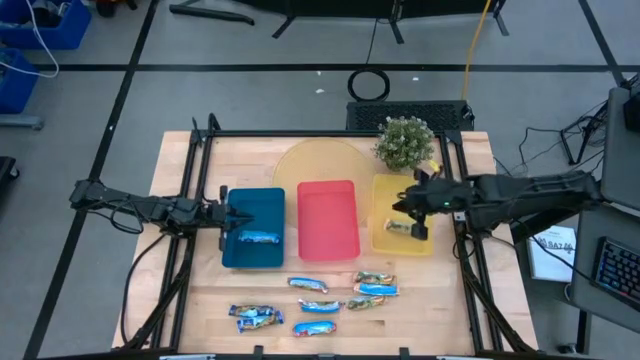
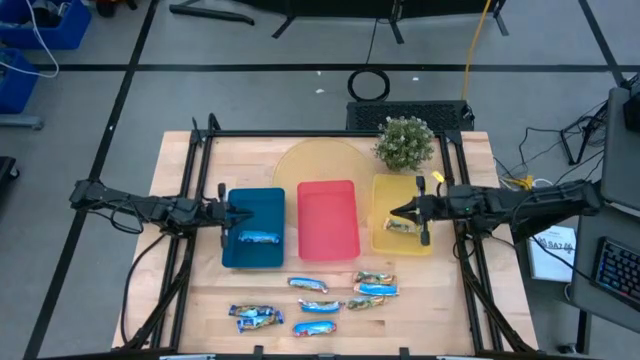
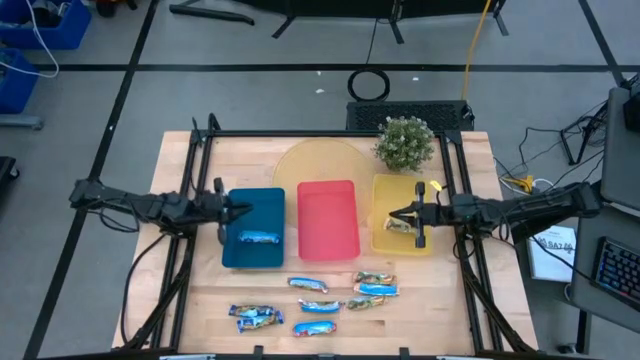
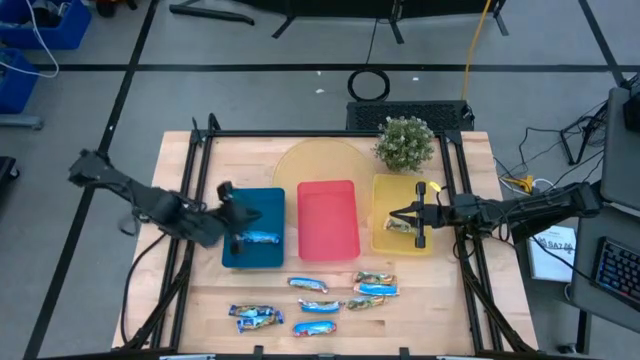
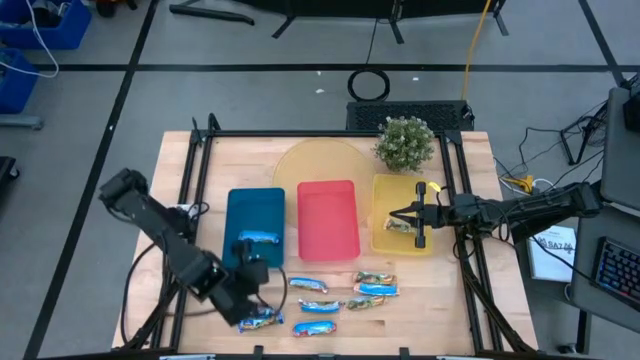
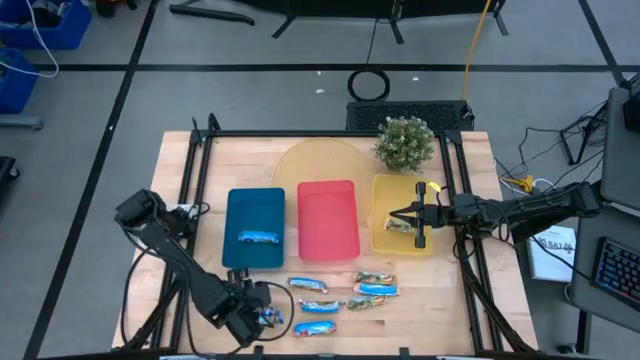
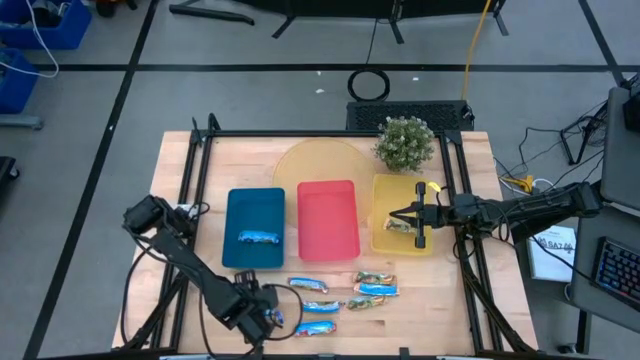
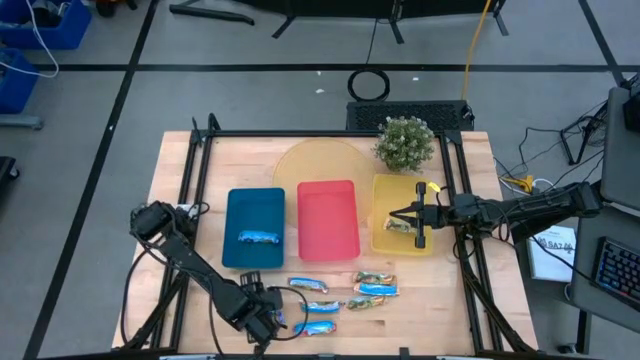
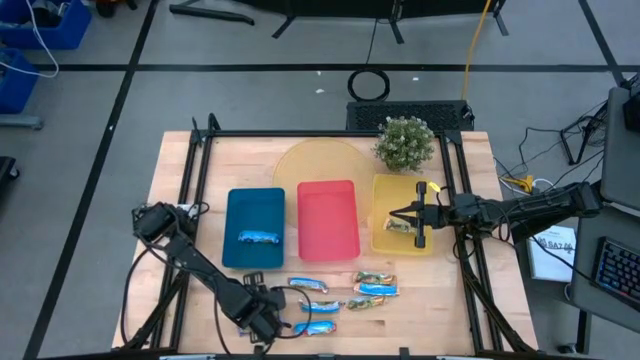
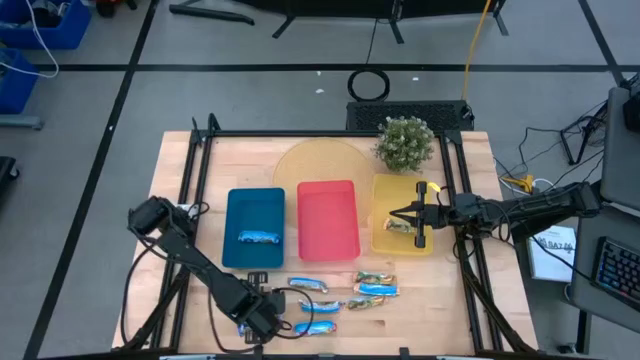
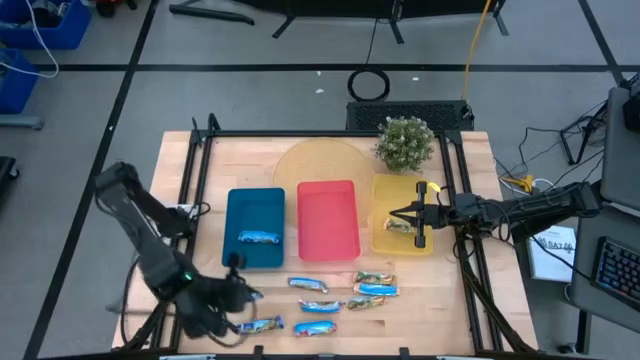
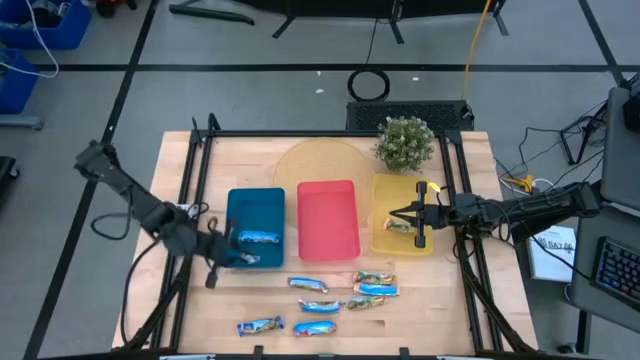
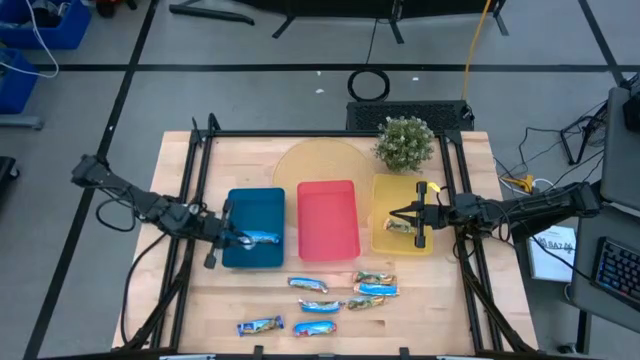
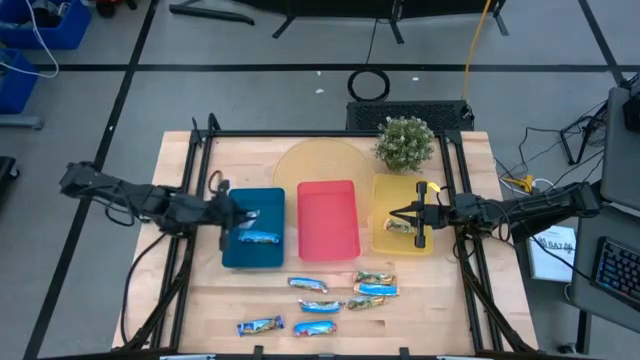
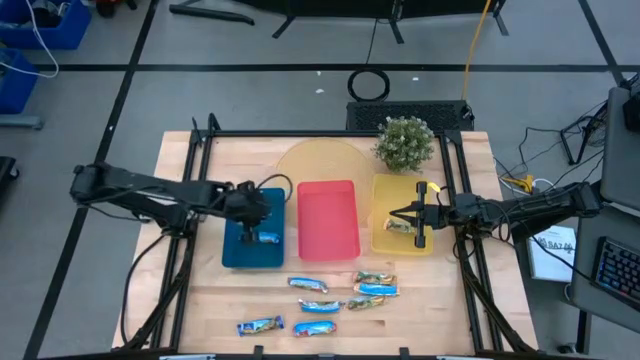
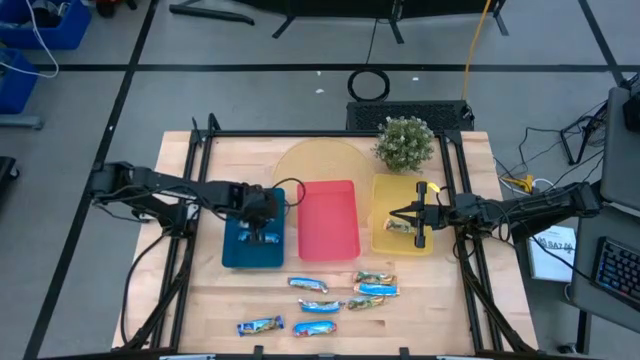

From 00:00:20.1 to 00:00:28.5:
Task: Pick and place Granola Bars by type
Put the blue granola bar into the blue bin

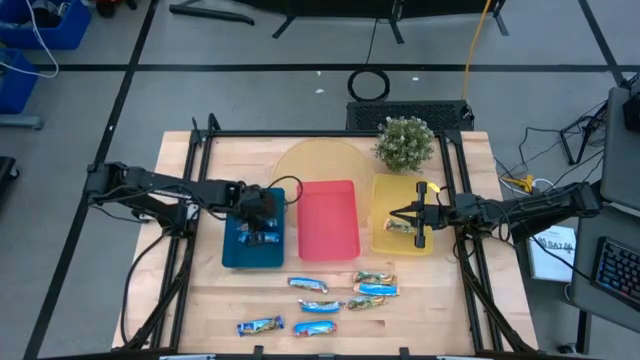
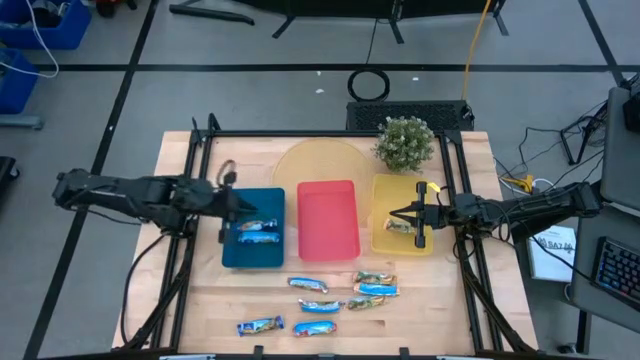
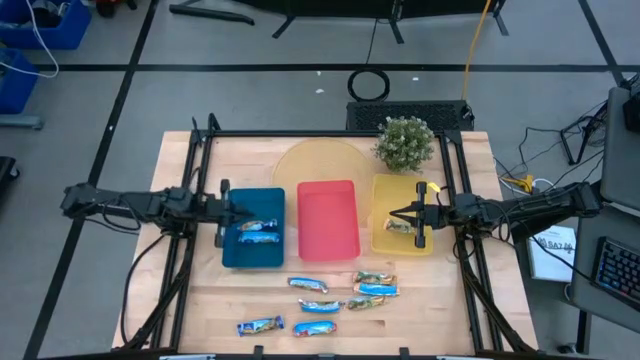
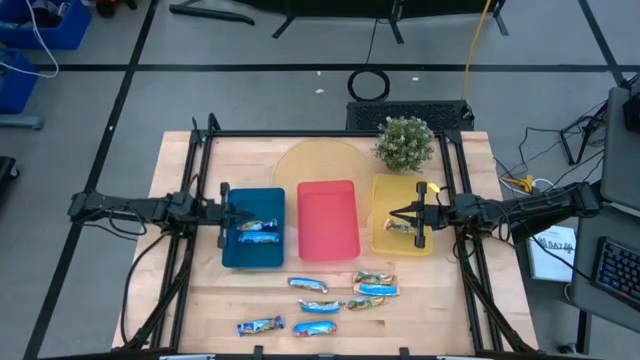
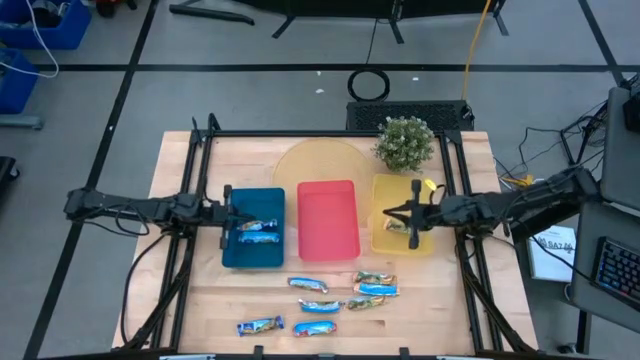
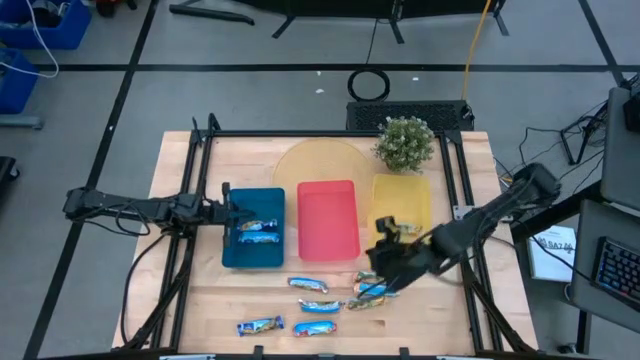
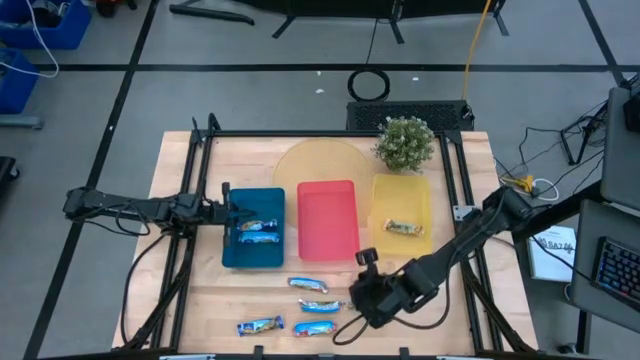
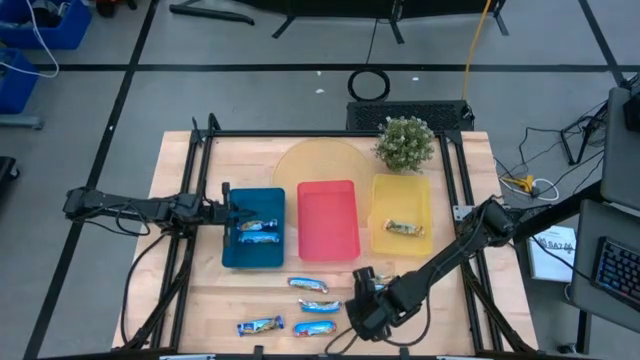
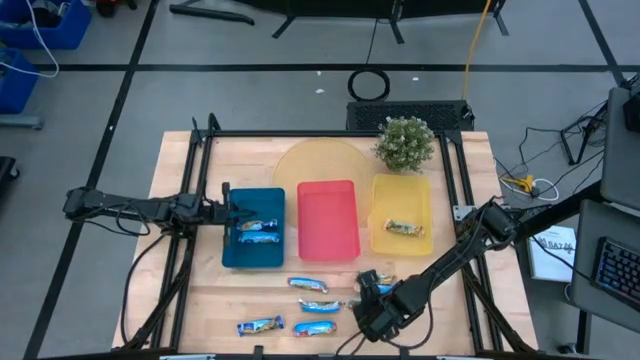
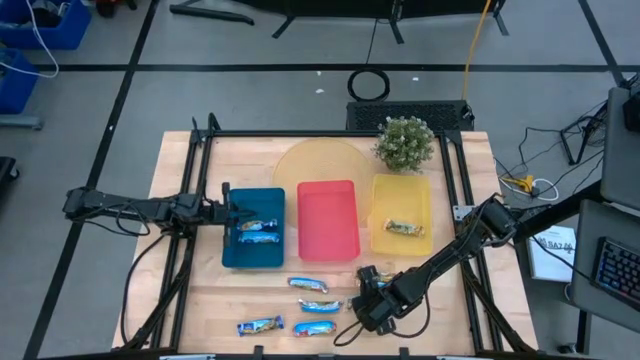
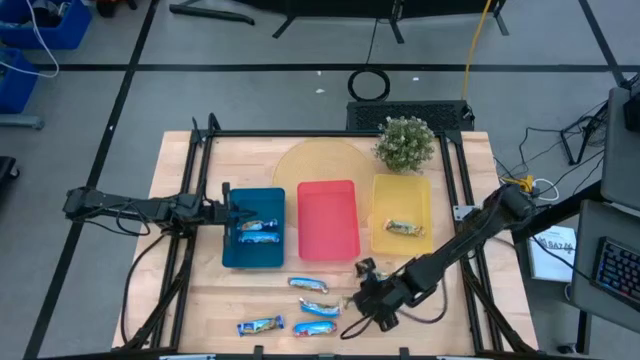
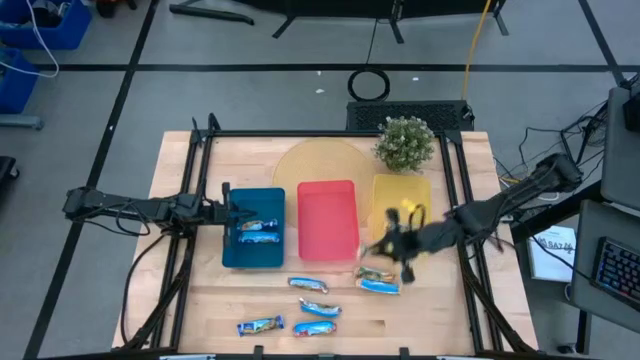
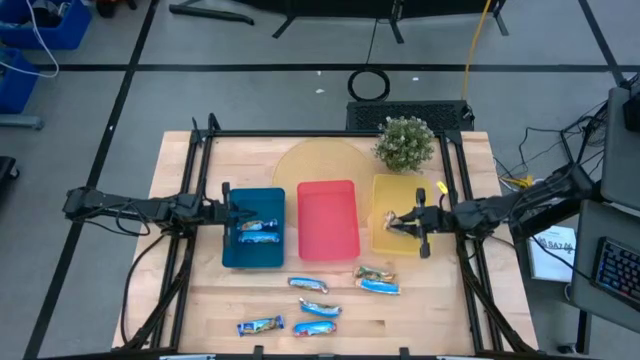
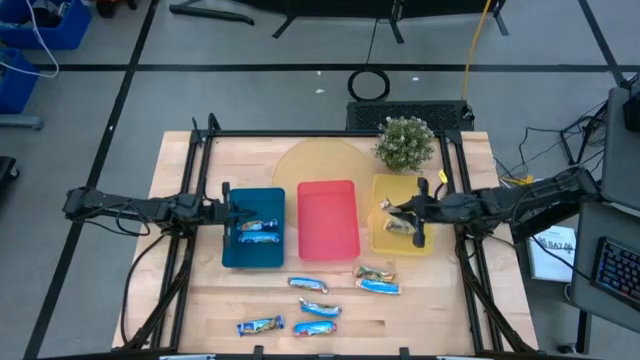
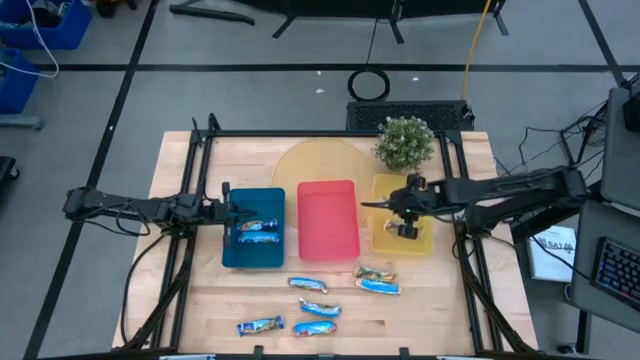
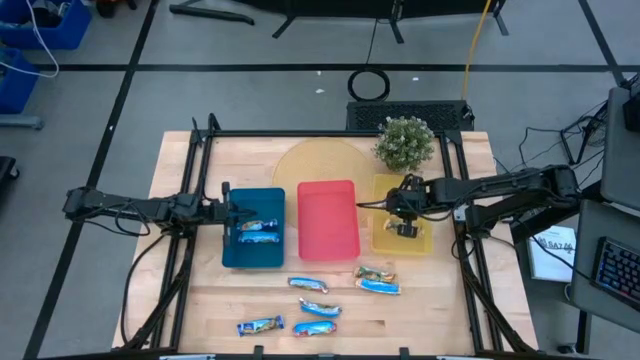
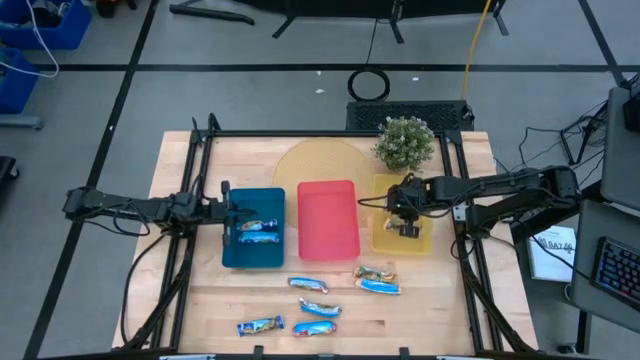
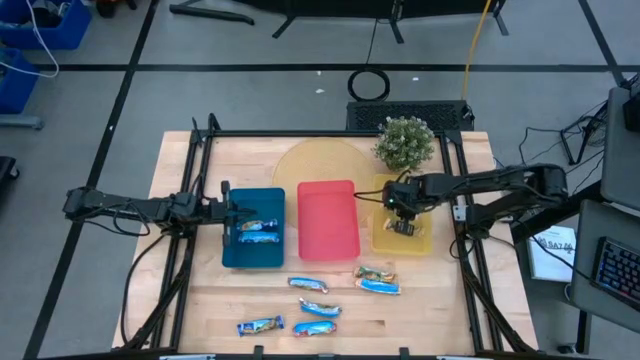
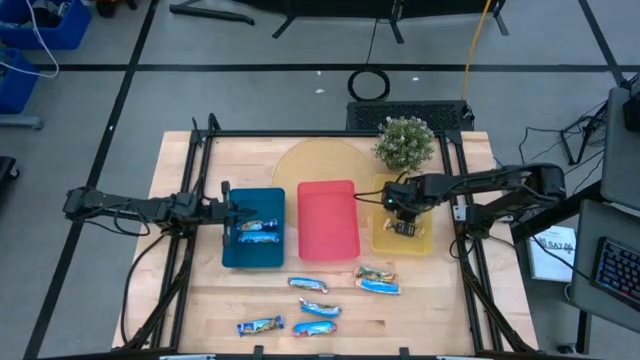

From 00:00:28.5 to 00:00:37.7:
Put the yellow granola bar into the yellow bin

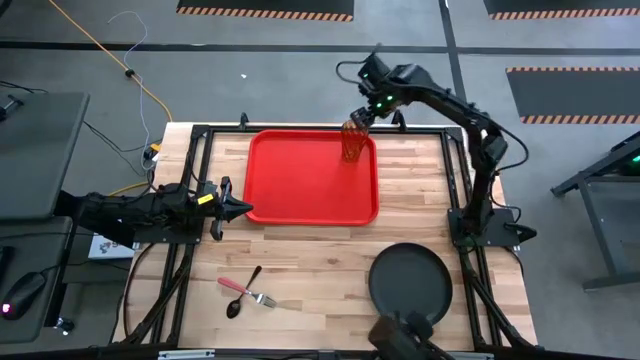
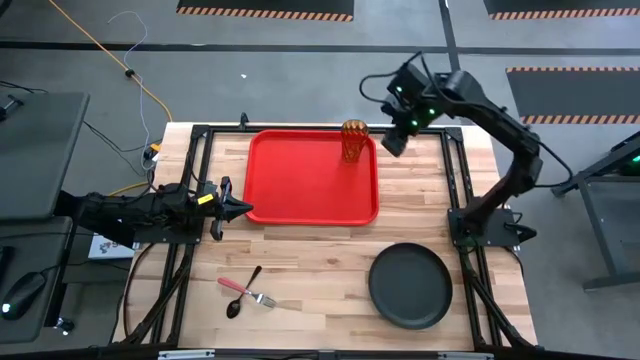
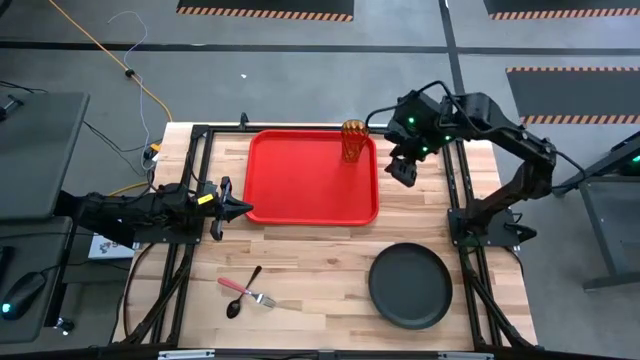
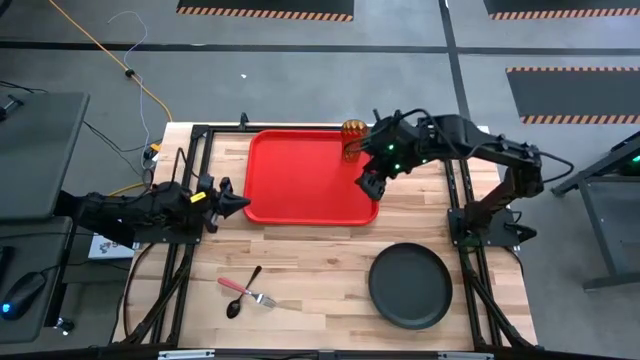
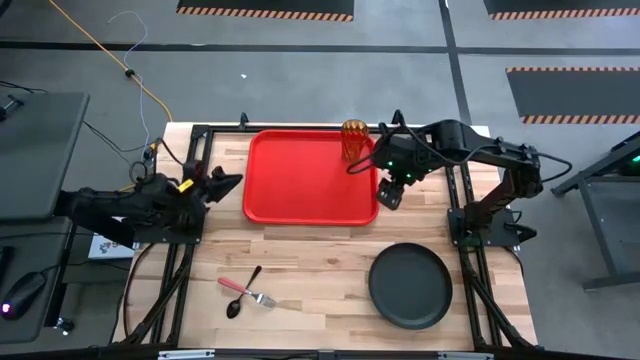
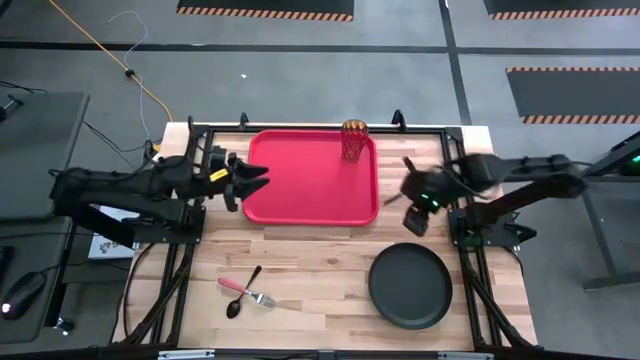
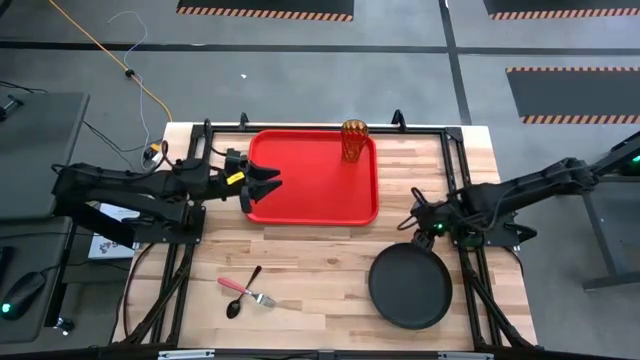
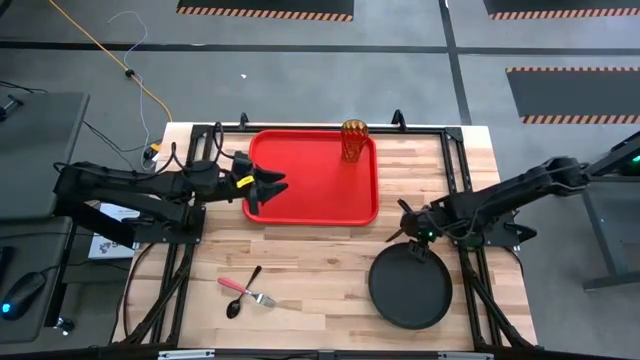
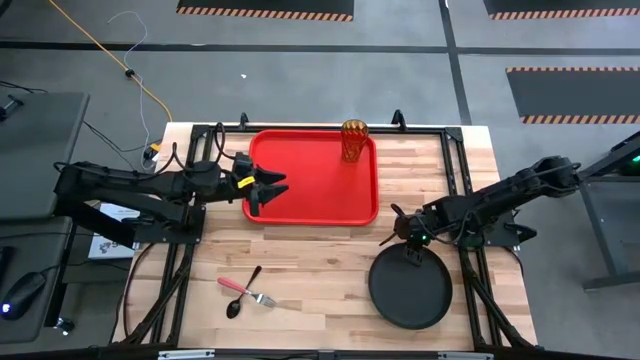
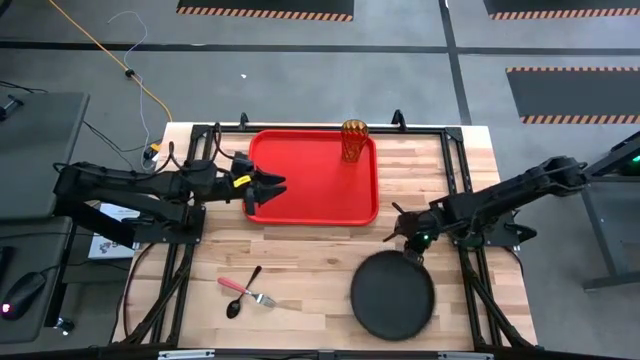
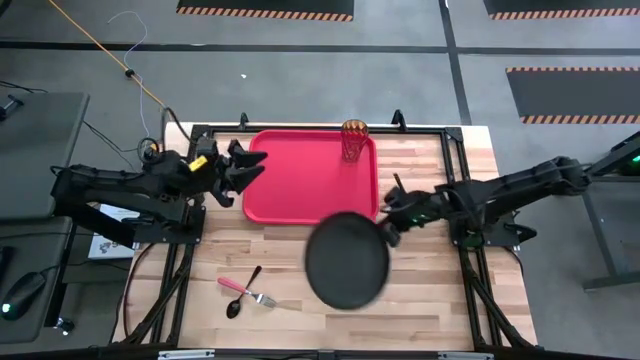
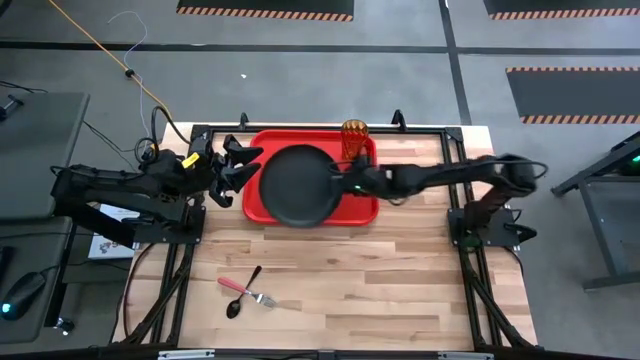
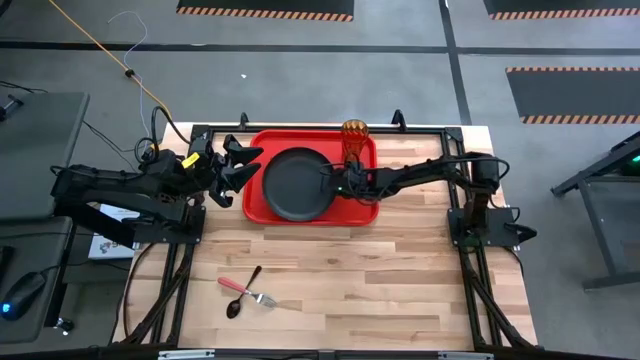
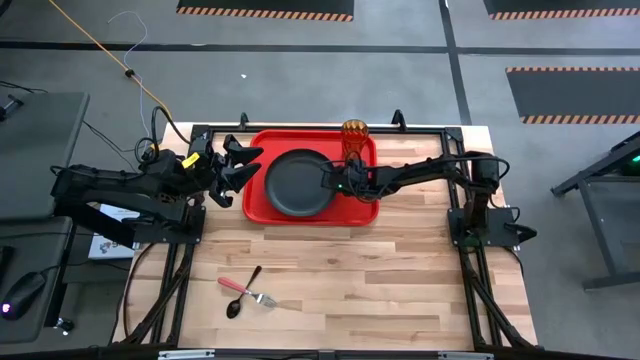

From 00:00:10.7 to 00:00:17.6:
Task: Pick and place plate/cup/fork/spoon on tray
Put the black plate on the red serving tray to the bottom left of the brown cup
